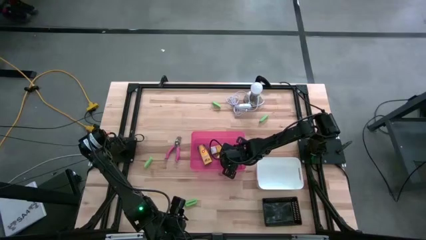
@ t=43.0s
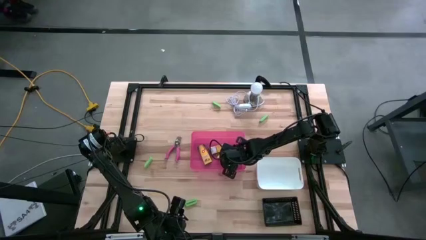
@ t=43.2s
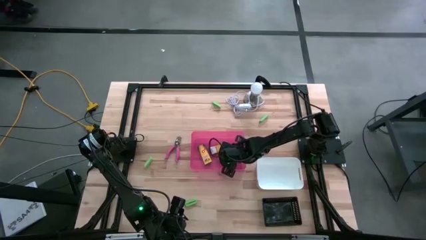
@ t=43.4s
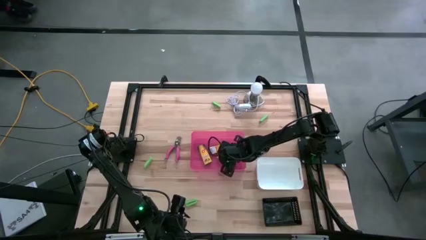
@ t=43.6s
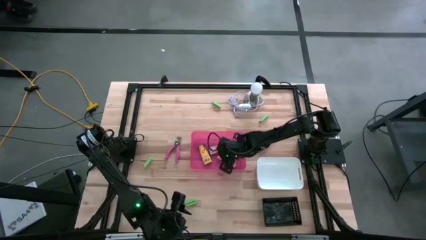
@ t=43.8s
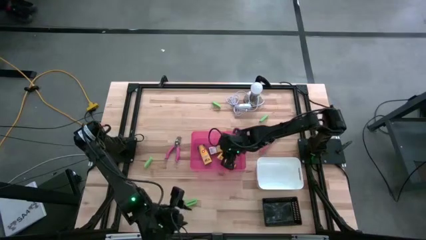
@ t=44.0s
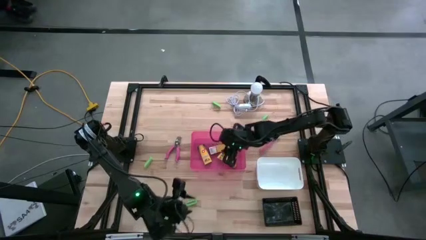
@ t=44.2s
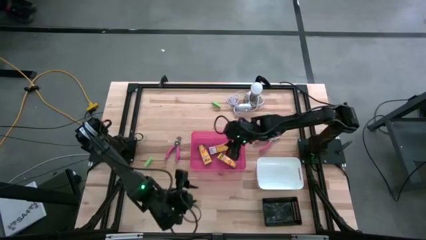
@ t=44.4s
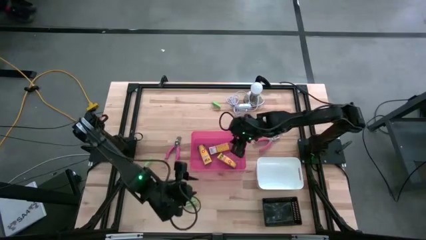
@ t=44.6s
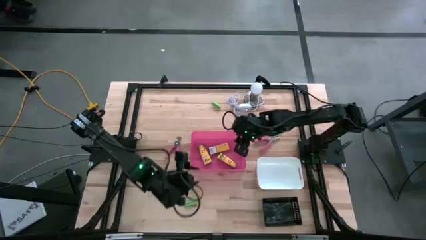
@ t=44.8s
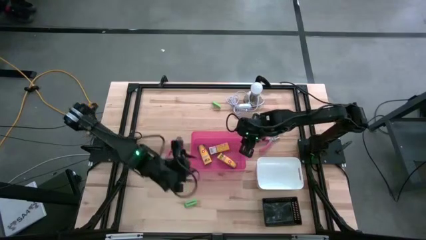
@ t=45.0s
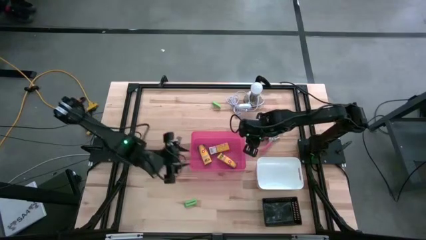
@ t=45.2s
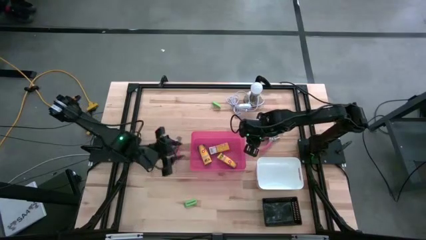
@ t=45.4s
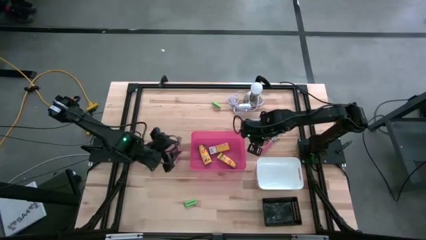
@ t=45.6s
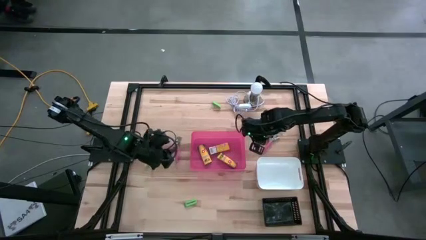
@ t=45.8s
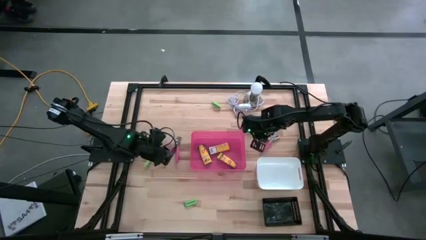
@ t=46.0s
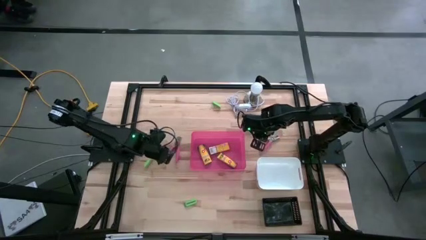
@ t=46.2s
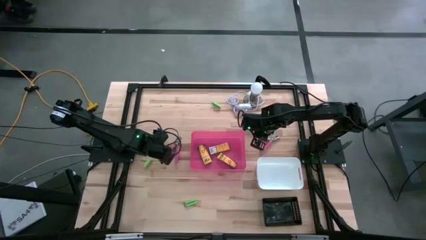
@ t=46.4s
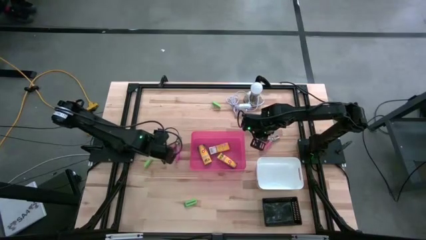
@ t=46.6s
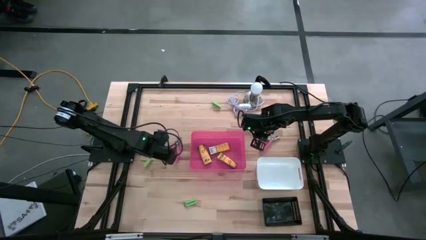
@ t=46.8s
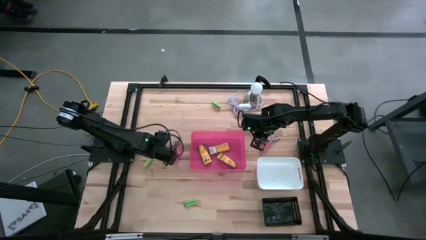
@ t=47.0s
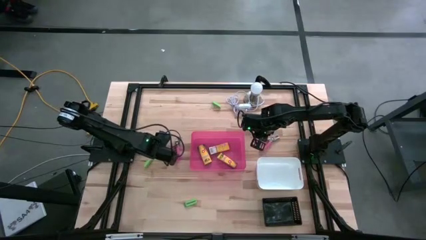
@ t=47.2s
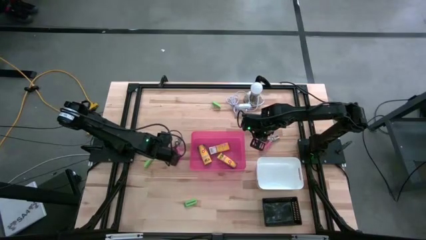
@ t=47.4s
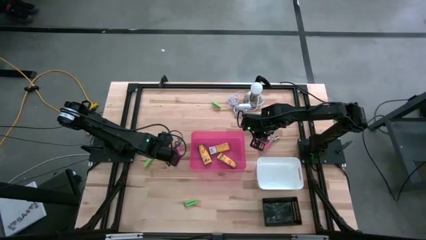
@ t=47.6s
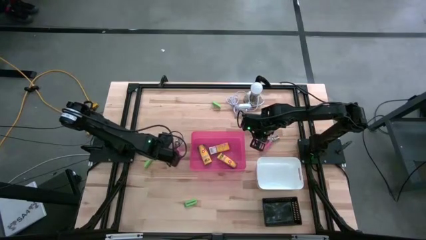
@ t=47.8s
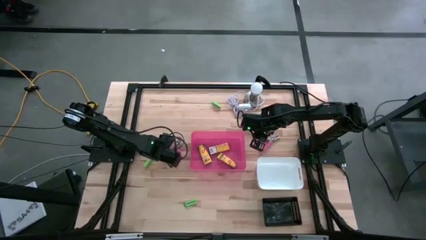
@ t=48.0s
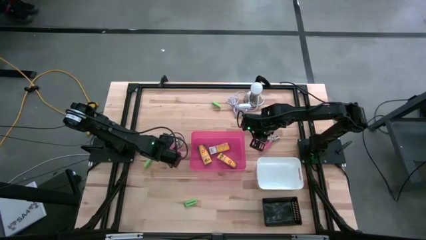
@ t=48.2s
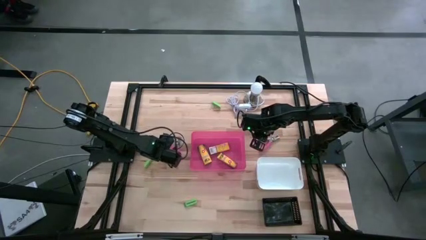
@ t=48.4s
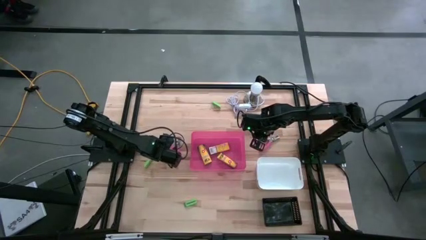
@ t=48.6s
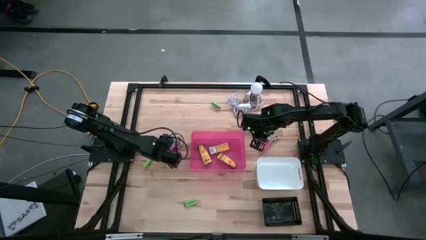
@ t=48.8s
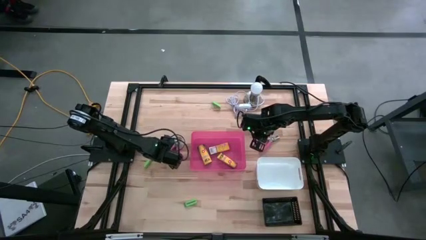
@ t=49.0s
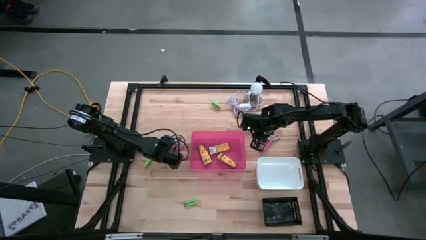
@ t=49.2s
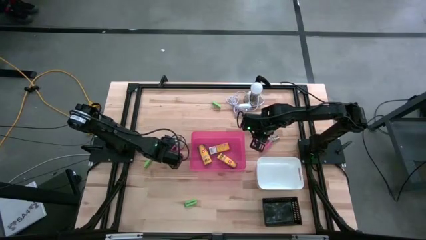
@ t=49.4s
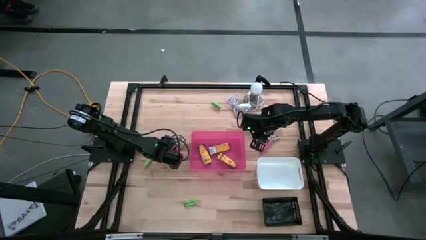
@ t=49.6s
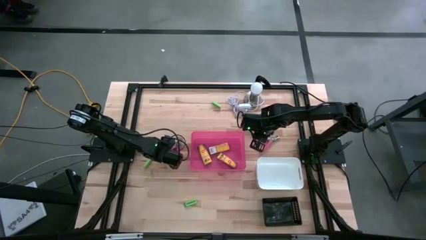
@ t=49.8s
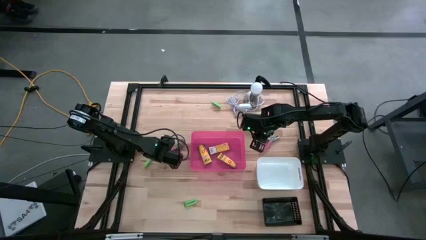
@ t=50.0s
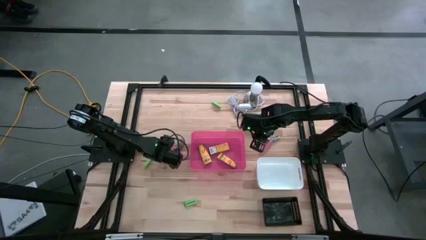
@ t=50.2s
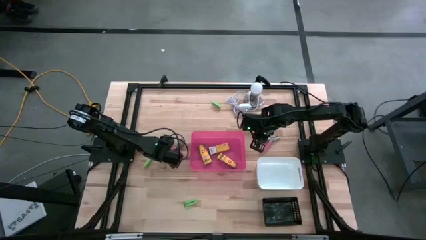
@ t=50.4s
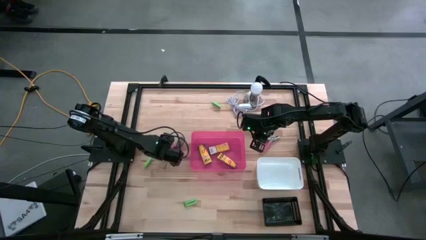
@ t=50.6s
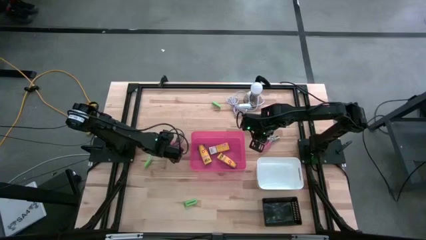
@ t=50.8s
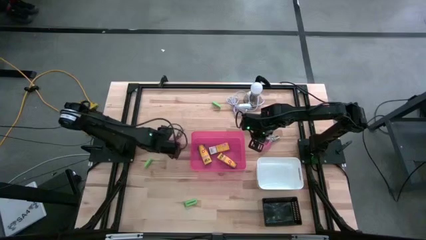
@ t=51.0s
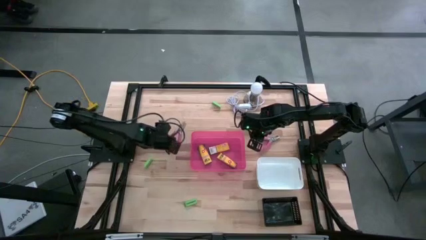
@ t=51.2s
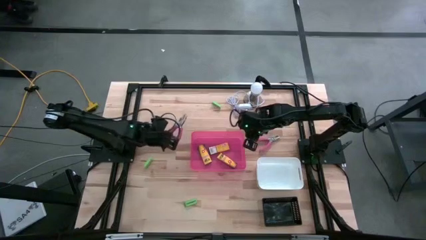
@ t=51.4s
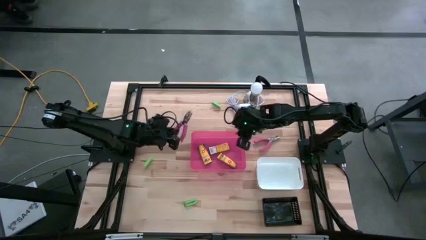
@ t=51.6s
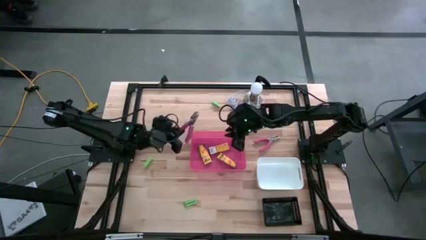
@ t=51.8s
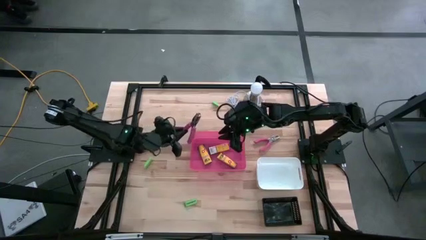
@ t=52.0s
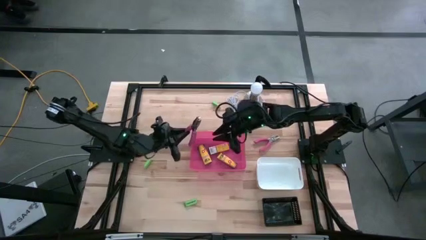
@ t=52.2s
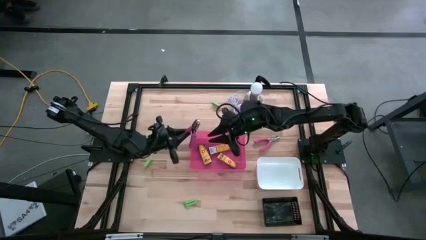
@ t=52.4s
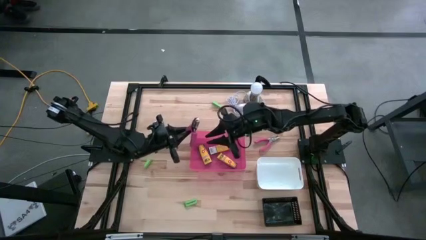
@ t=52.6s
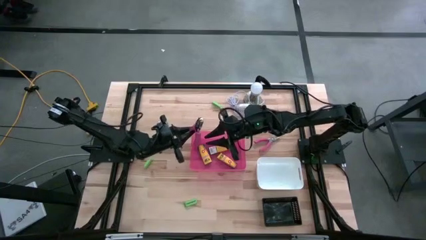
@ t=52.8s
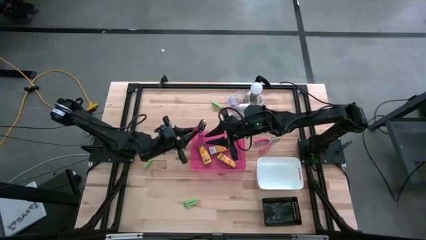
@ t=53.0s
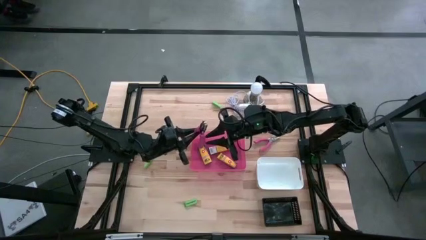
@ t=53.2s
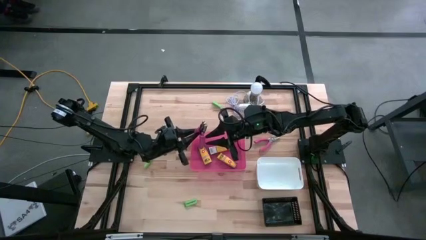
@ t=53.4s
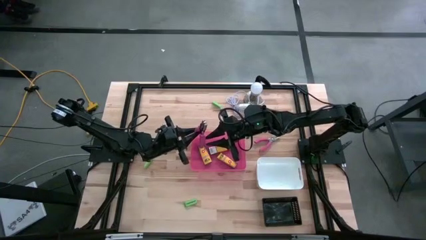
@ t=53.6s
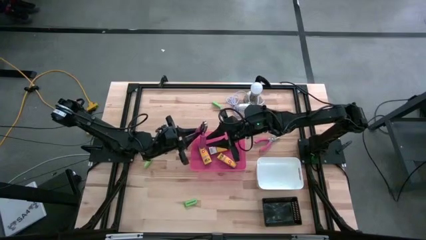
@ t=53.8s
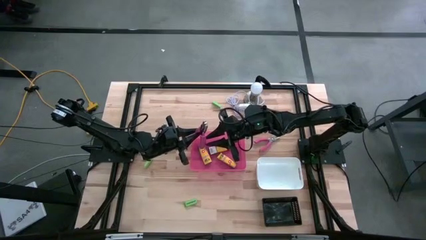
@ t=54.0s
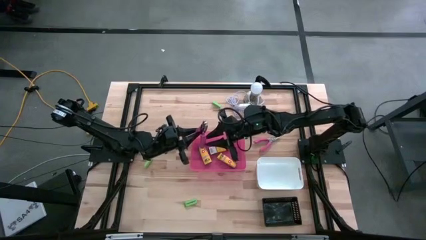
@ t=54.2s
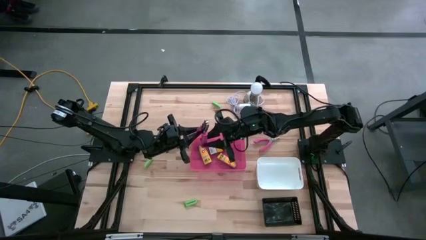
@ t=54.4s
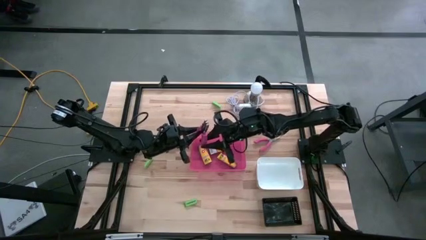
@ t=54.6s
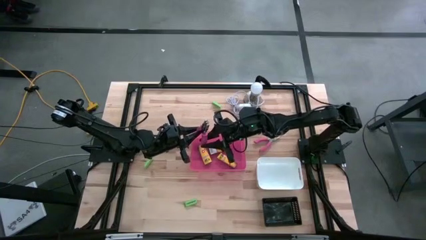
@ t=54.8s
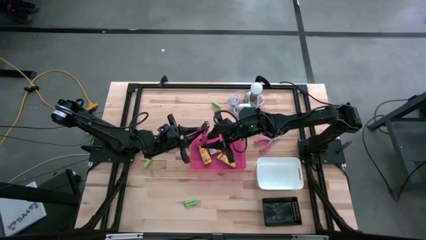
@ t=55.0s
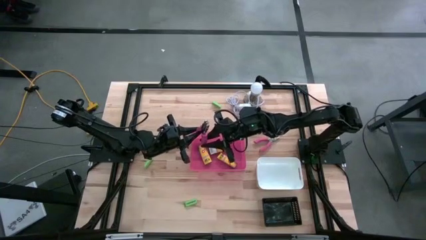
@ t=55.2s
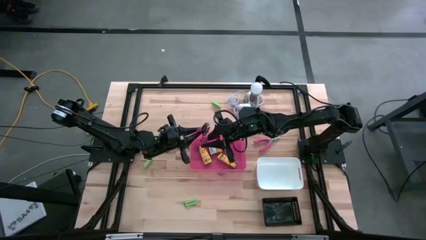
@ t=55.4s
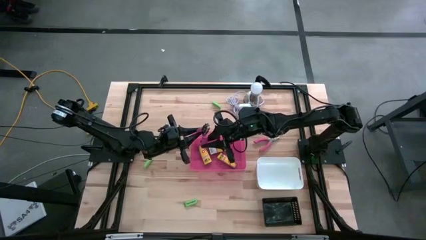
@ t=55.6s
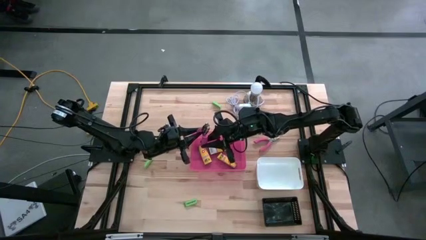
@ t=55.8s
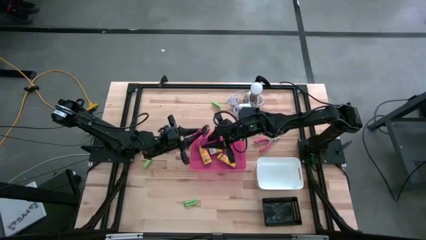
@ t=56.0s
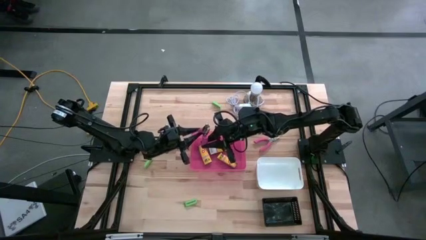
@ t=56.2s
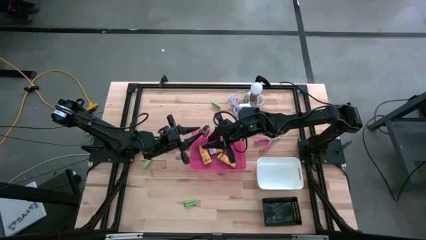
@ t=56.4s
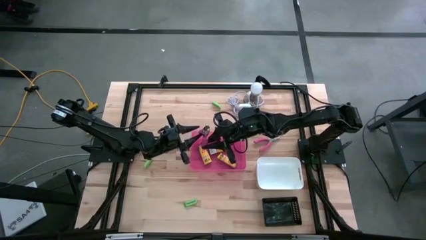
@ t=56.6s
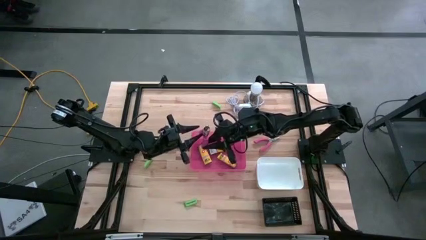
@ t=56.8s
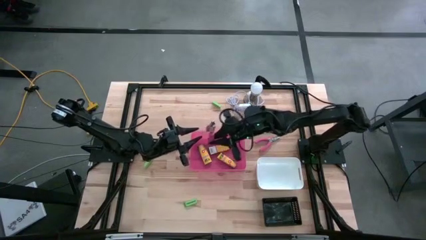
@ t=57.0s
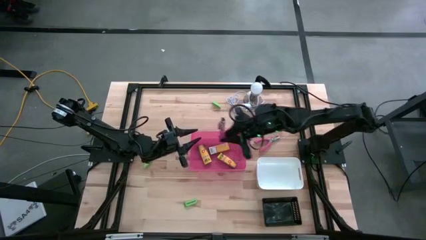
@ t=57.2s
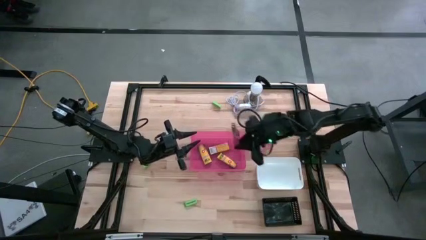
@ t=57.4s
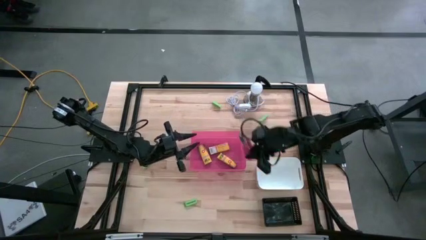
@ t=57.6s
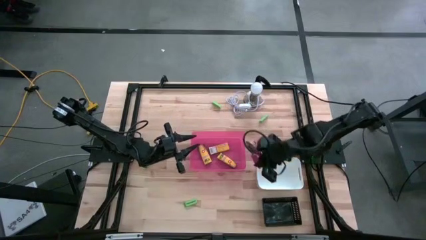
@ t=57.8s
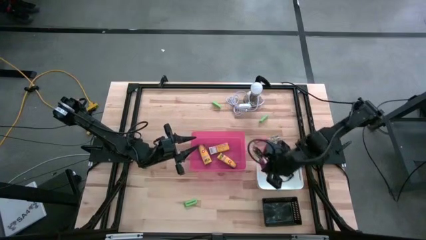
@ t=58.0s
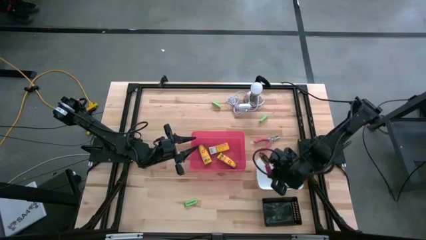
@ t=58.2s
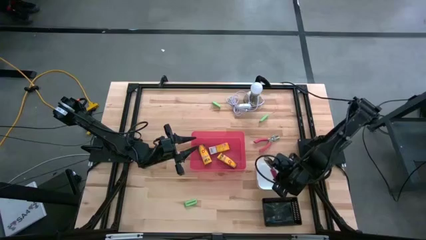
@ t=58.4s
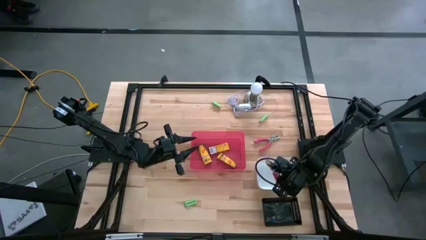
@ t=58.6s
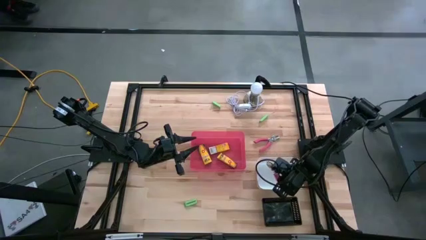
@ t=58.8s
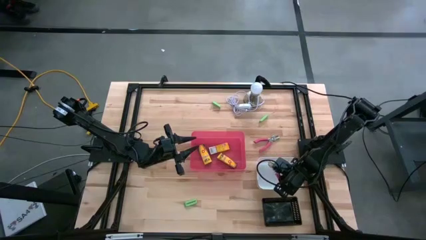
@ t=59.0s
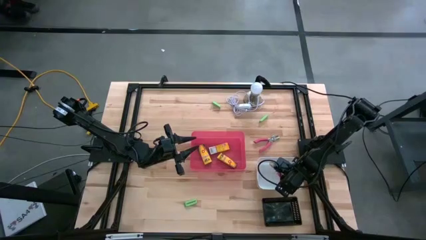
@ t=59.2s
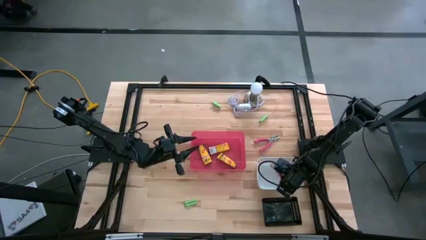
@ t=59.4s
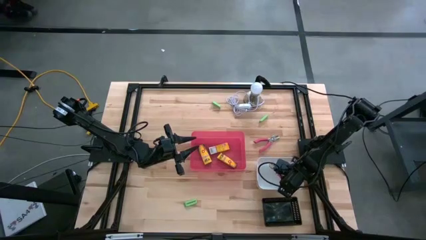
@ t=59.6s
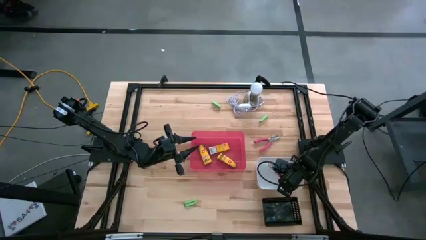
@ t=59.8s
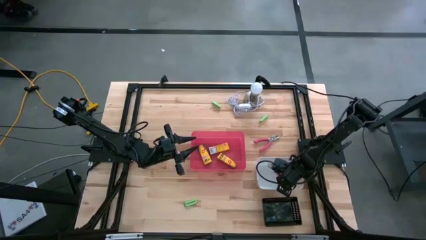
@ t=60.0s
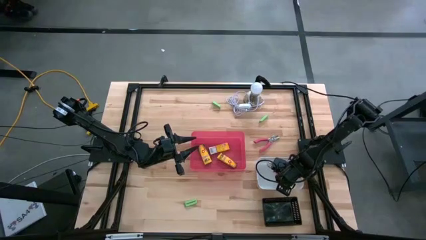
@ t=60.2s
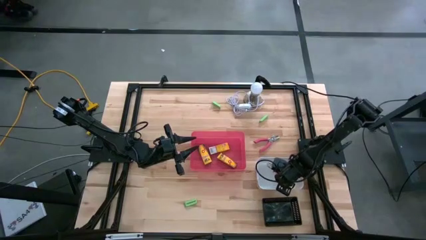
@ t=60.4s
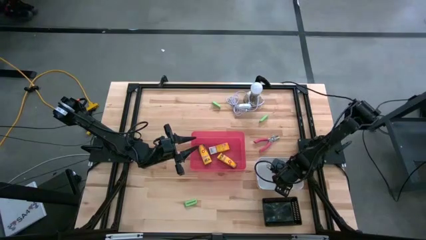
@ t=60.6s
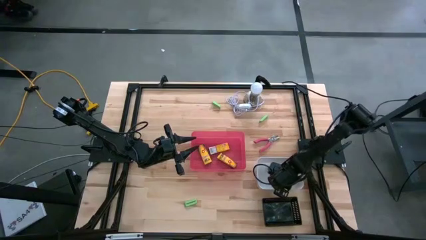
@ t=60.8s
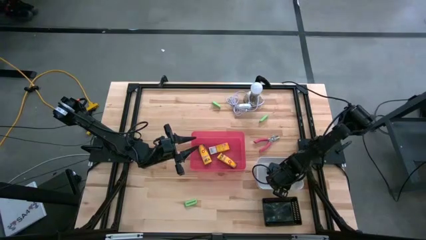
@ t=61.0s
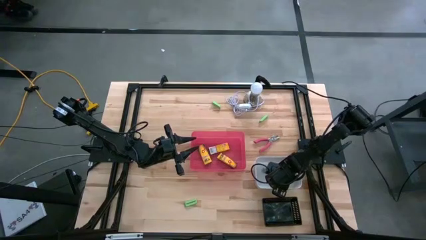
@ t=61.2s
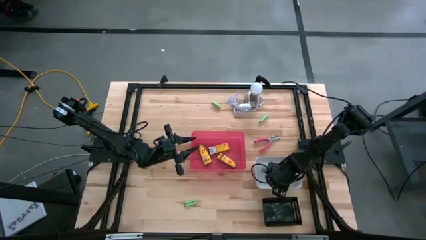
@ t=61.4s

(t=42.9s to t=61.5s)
Task: Pick & Place School Supplies
Put the pink hole puncher into the white bin
